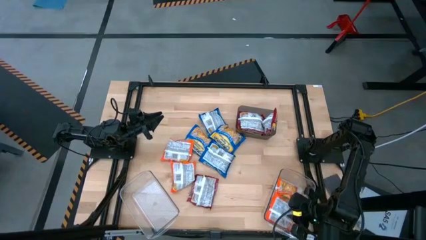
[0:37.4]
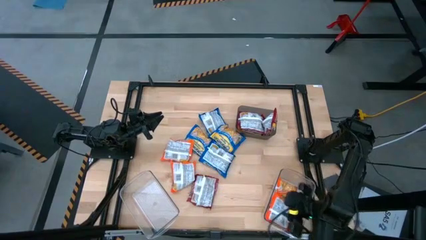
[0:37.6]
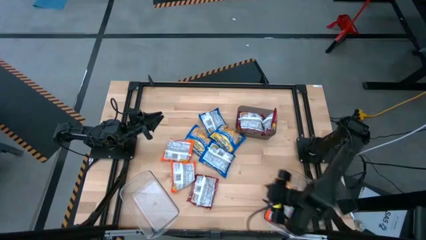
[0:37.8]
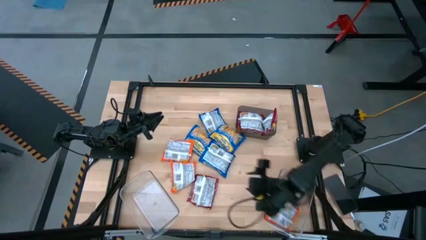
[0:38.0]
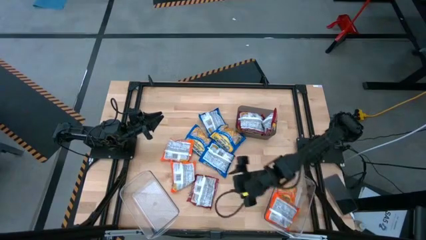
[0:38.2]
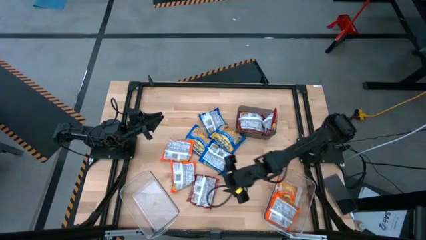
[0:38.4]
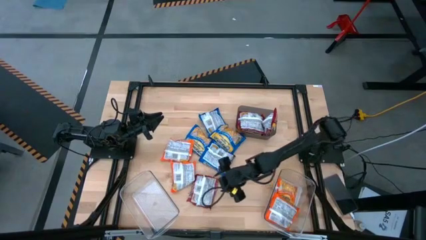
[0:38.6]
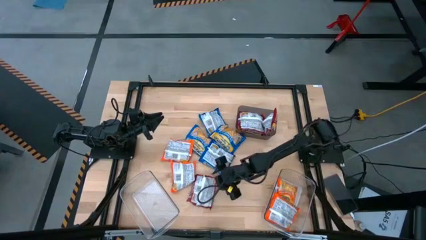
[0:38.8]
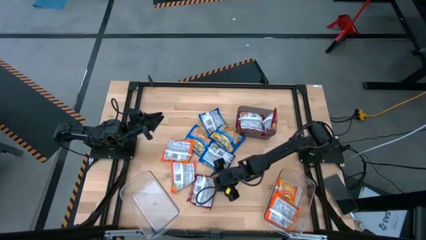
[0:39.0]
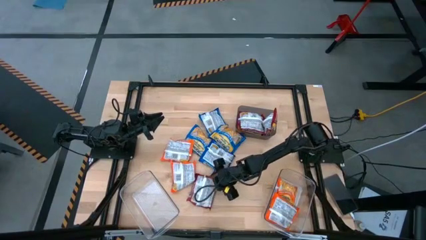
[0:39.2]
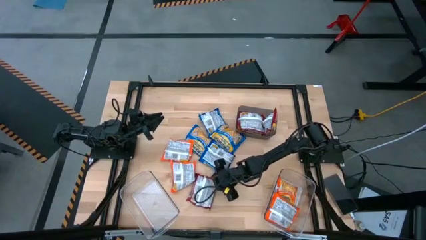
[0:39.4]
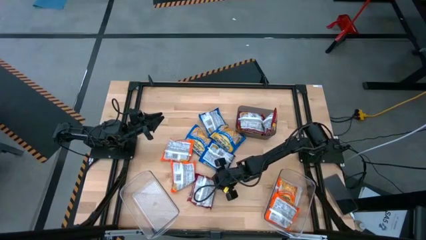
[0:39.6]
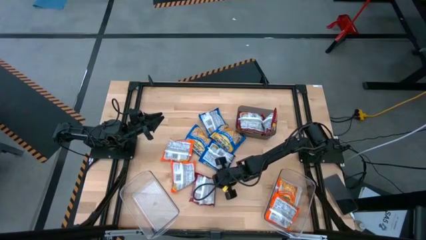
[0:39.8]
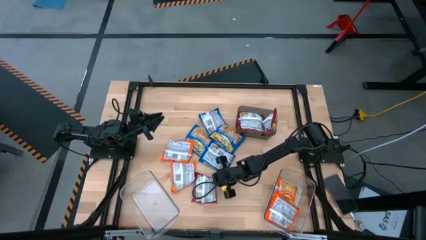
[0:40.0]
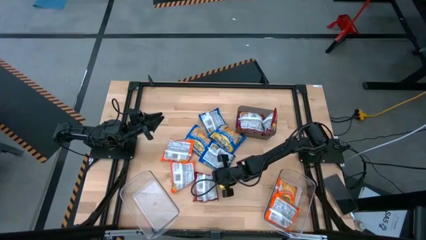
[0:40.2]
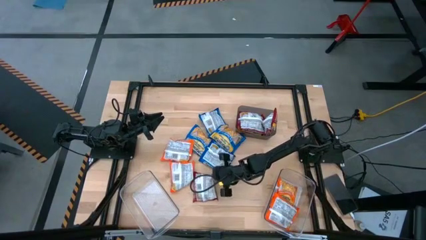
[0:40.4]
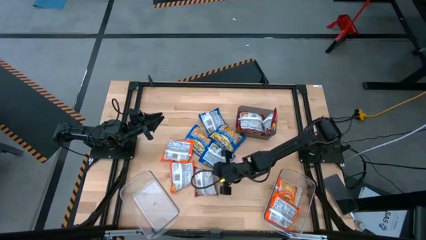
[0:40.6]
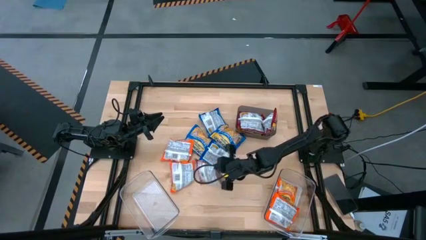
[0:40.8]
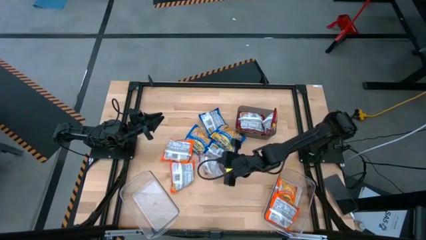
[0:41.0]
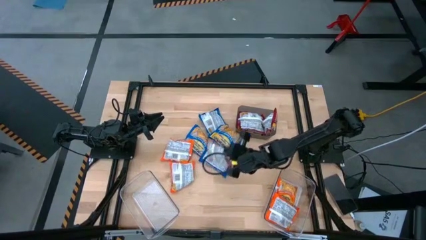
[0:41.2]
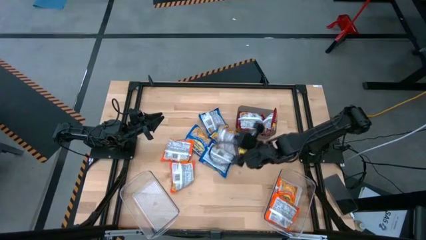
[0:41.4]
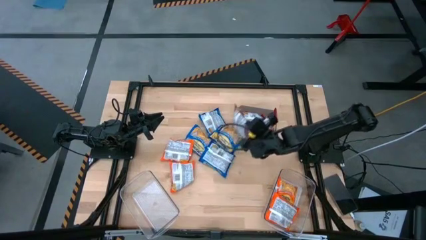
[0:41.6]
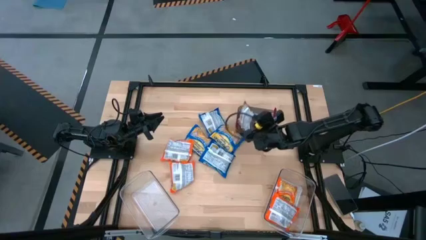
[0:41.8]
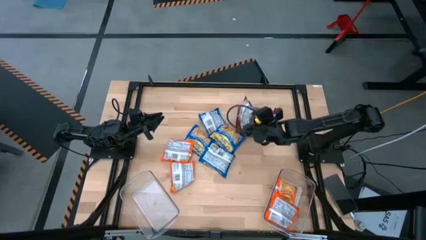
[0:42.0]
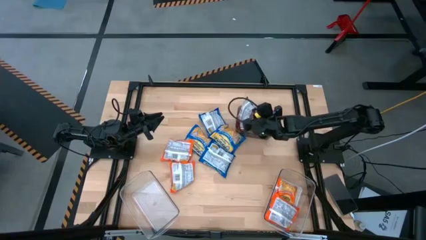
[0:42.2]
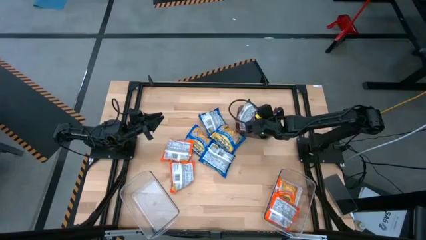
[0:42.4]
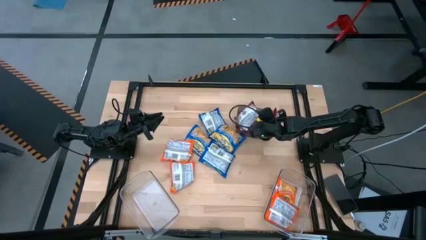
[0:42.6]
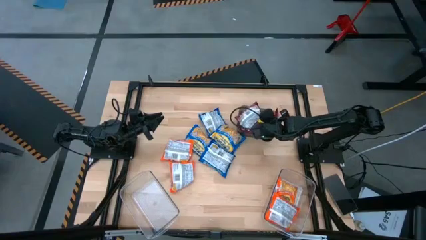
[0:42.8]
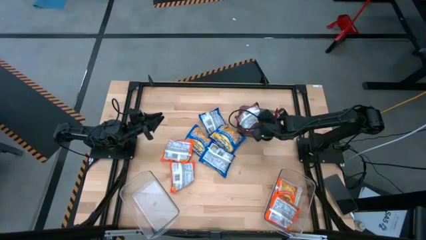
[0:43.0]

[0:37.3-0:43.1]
Task: Sort Maruchan noodles
Put the red noodle pack into the black bin

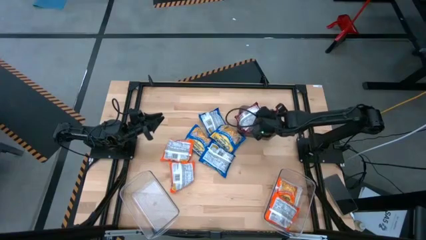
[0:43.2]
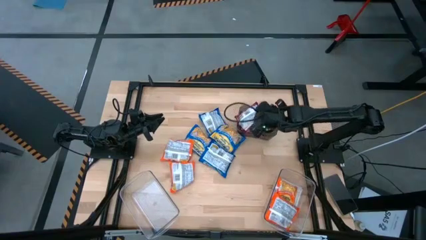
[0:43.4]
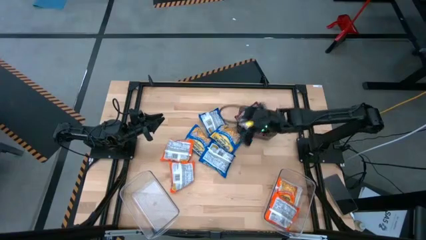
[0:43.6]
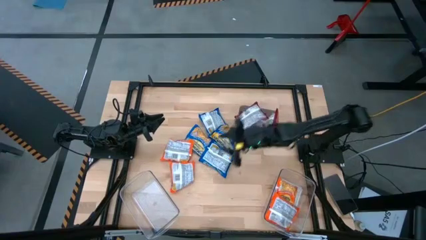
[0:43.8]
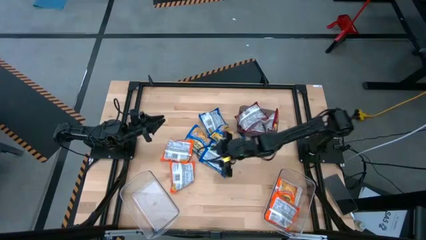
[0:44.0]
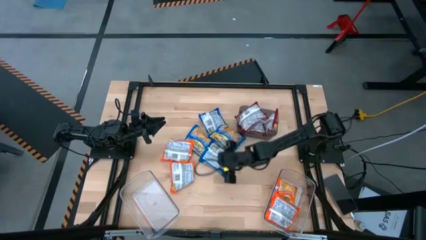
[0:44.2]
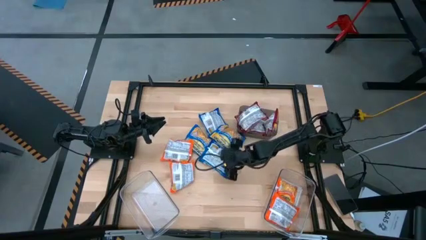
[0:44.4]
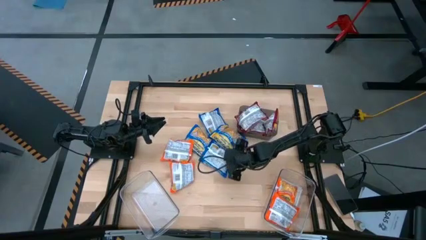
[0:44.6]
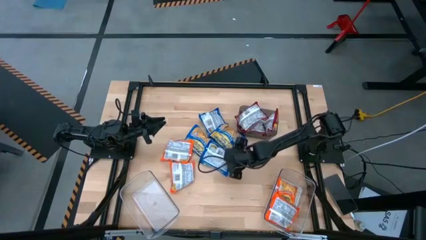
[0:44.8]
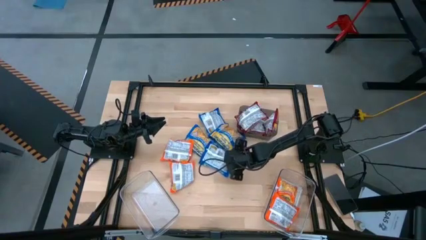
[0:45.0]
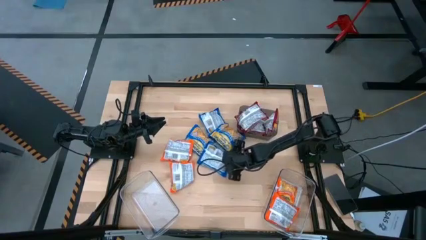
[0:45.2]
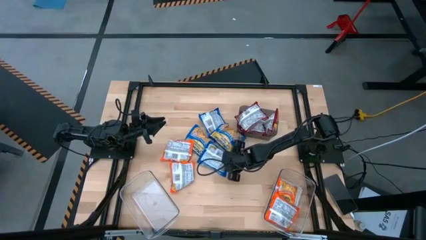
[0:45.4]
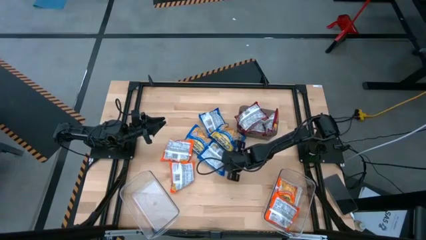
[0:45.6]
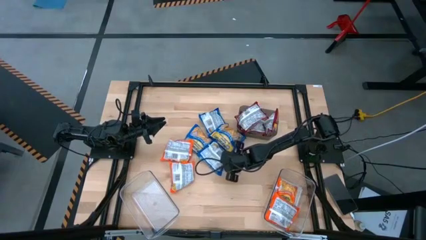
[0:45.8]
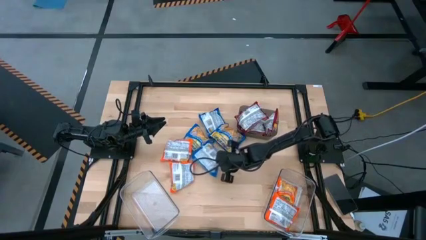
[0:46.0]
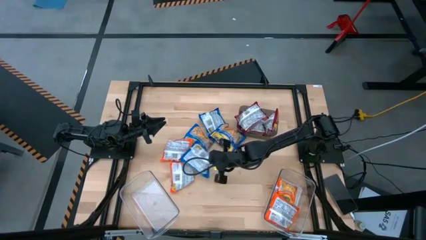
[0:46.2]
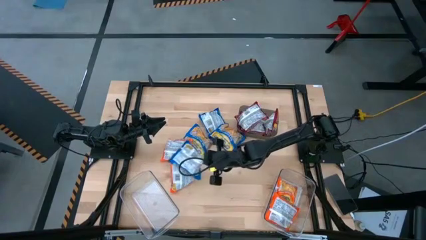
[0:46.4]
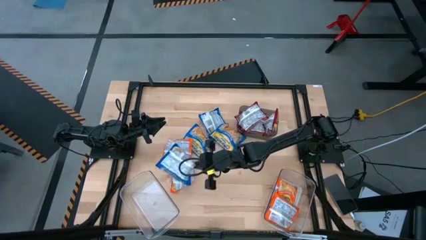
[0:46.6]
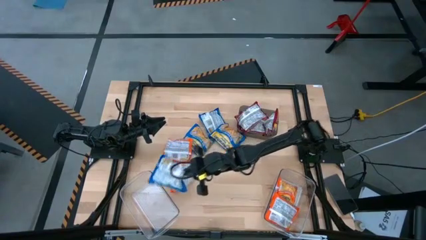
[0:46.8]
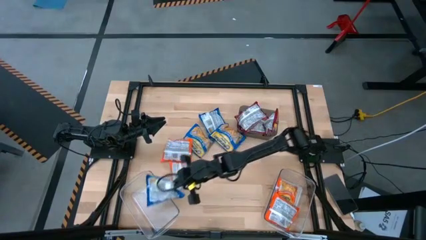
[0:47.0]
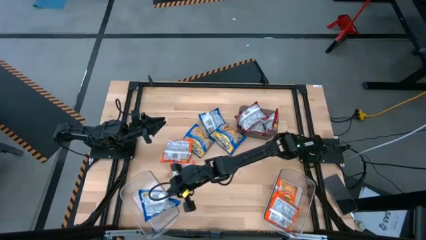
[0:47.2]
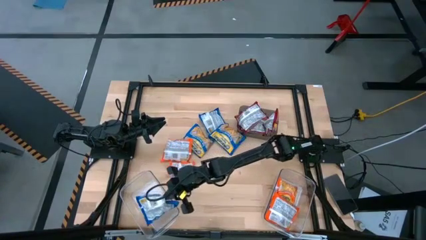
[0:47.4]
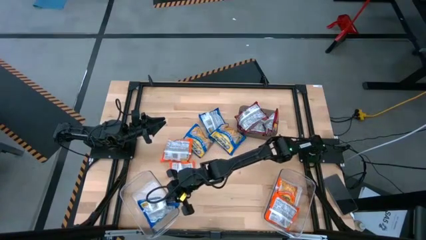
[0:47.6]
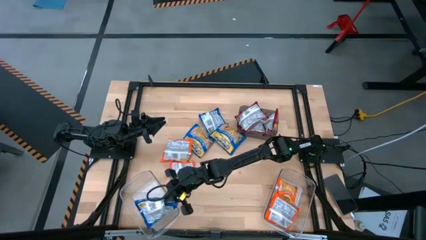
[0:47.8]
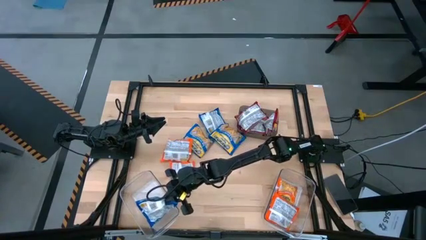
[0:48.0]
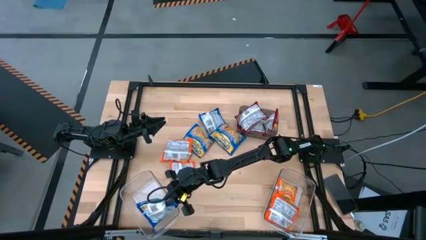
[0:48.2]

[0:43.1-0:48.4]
Put the blue noodle pack into the left transparent bin

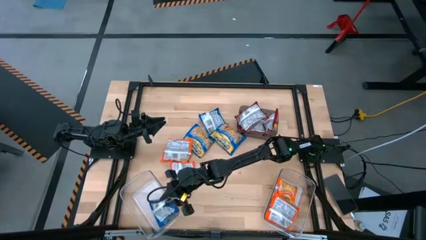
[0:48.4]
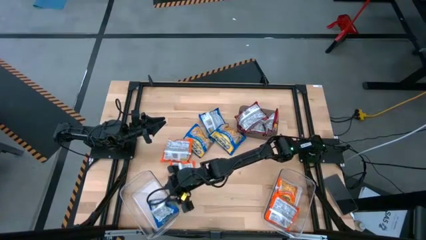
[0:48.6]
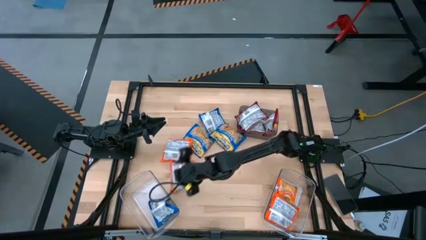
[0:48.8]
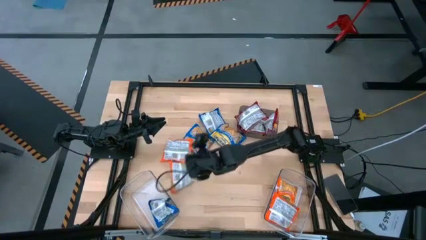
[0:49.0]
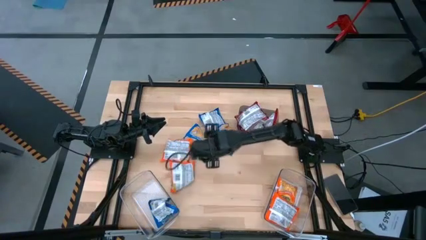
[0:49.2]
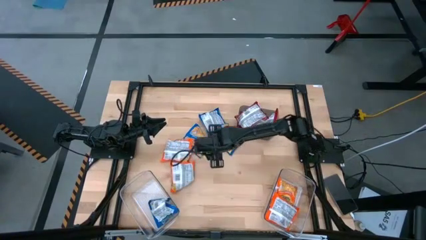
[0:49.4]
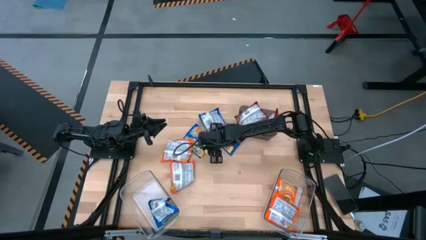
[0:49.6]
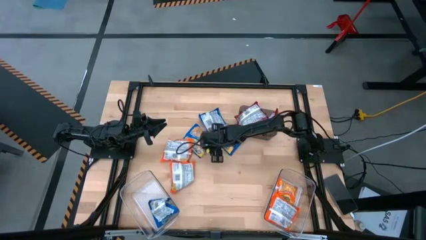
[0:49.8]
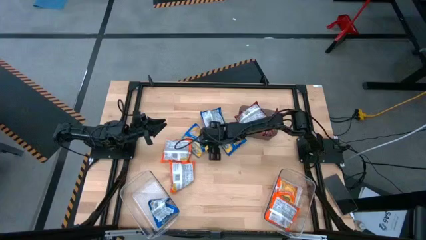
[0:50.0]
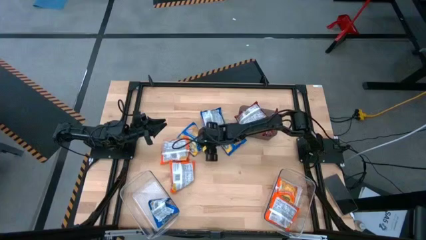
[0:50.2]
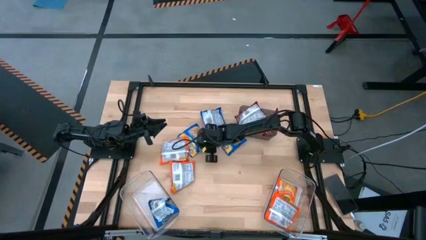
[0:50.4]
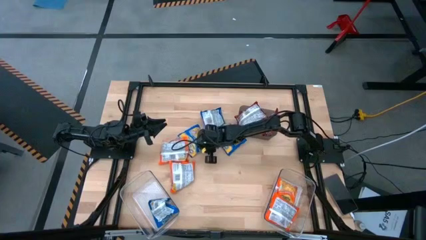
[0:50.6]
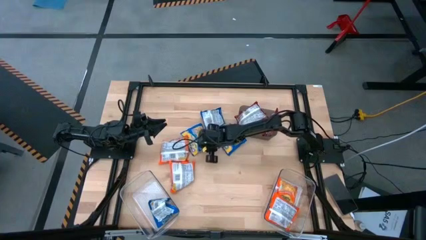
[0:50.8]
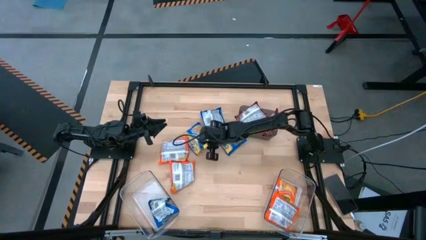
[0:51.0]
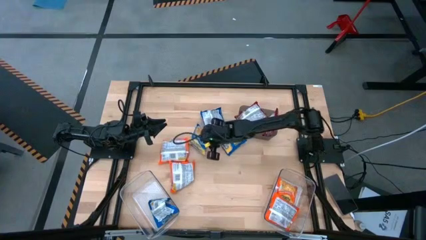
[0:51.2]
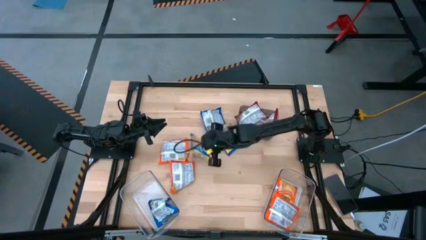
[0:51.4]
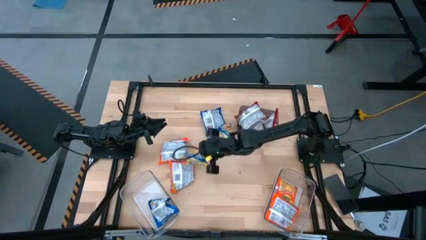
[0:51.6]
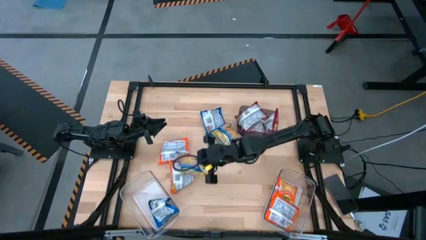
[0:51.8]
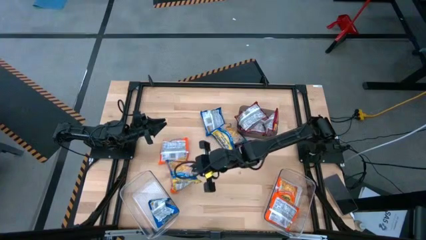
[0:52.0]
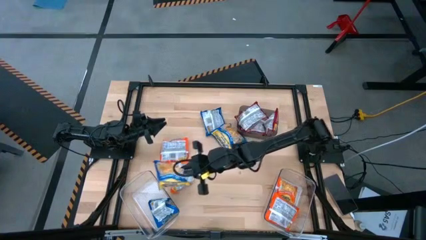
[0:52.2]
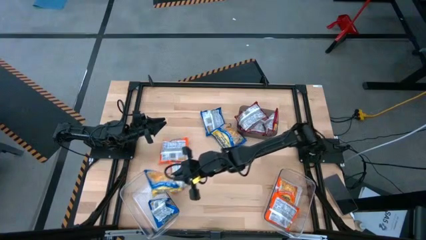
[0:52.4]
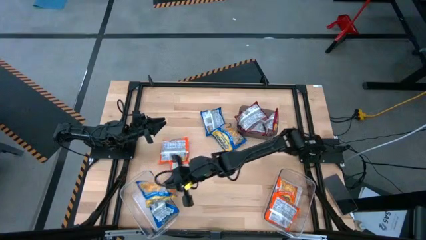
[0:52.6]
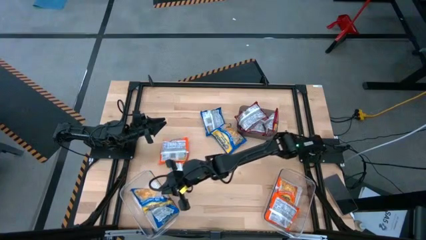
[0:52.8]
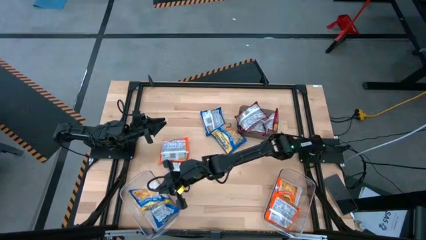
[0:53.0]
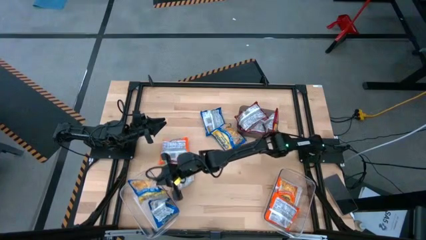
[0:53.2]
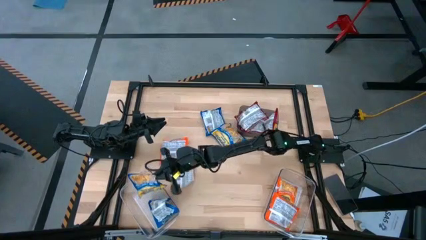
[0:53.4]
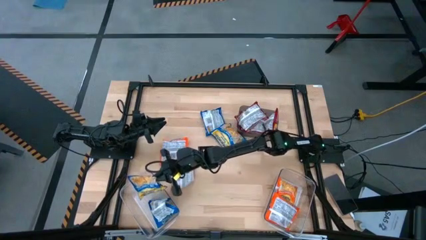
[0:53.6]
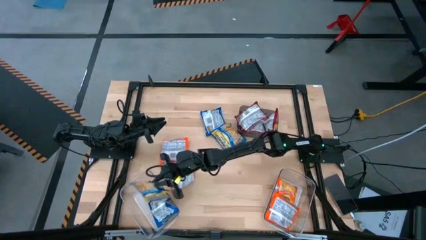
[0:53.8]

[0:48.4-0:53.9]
Put the blue noodle pack into the left transparent bin

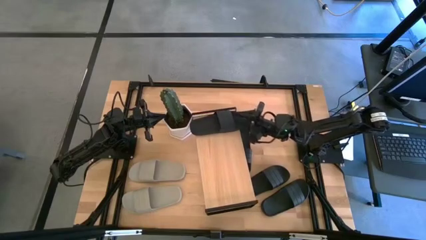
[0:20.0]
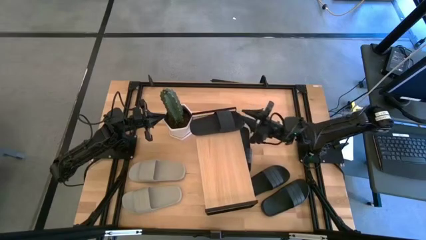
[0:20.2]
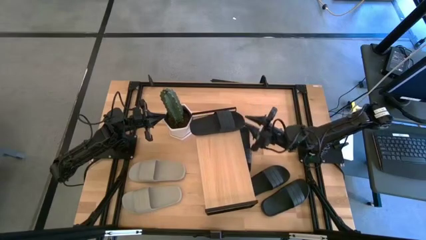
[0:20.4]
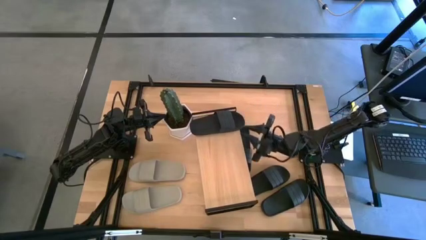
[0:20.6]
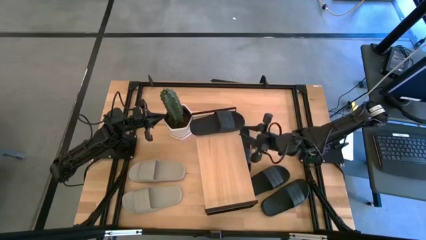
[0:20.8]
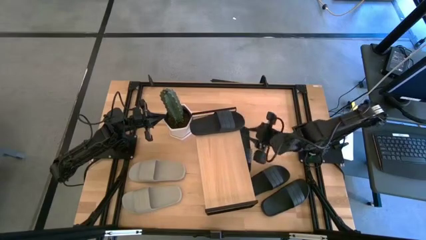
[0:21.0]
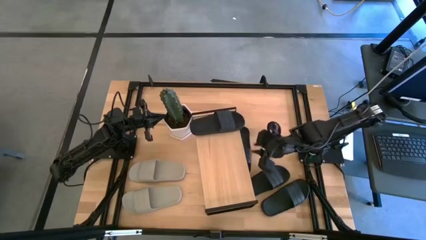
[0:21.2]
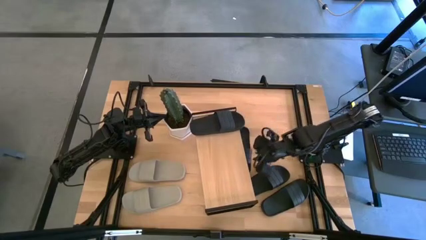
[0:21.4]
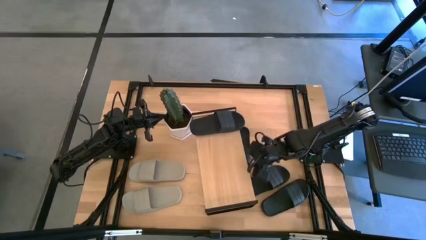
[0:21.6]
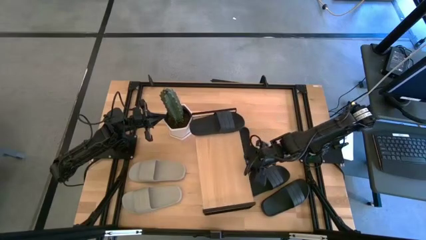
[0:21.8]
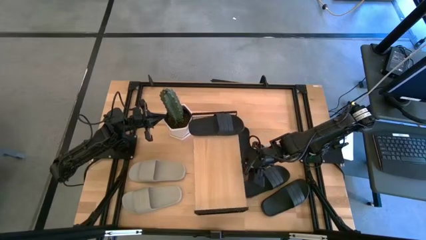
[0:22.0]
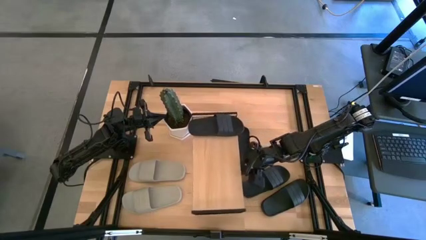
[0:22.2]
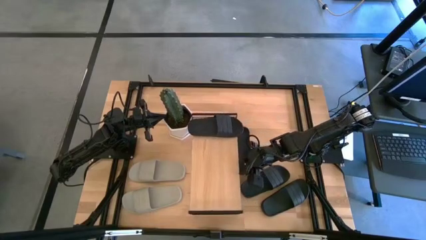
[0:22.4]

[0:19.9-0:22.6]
Task: Pick and place slides into the shelf
Adjust the shelf
